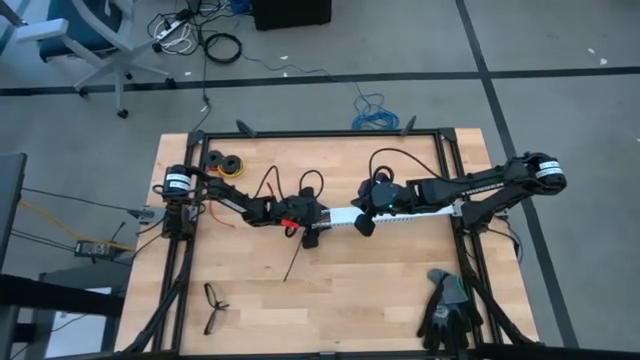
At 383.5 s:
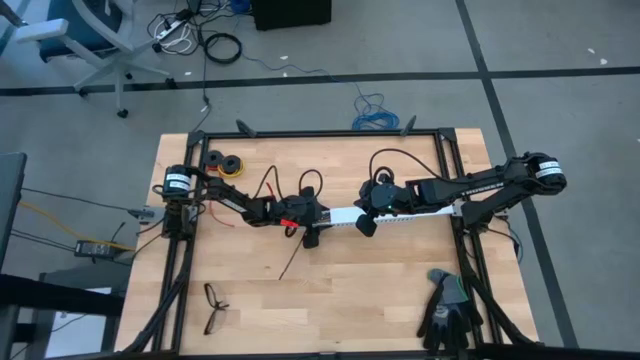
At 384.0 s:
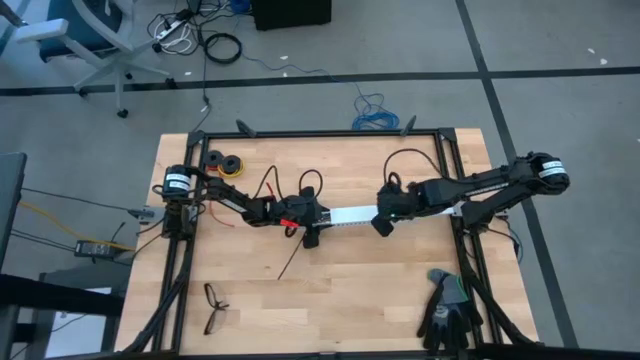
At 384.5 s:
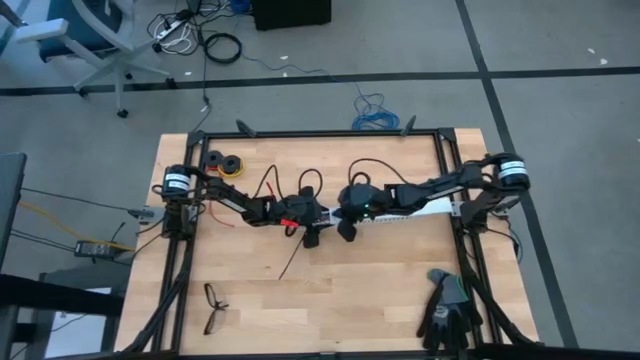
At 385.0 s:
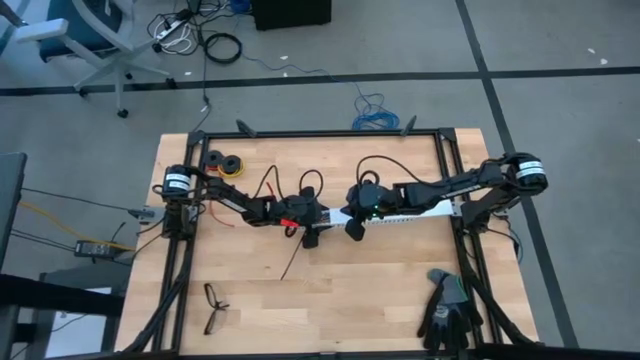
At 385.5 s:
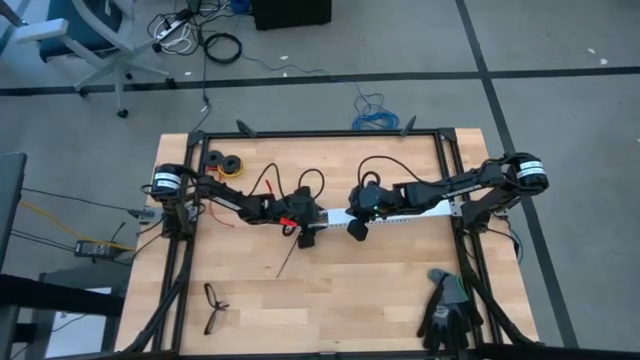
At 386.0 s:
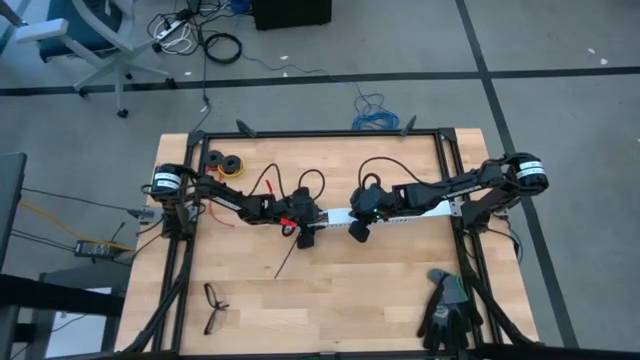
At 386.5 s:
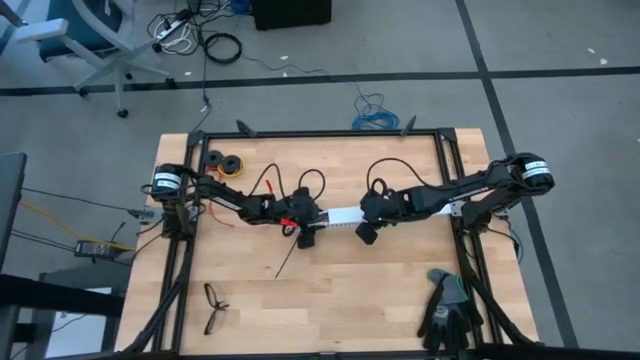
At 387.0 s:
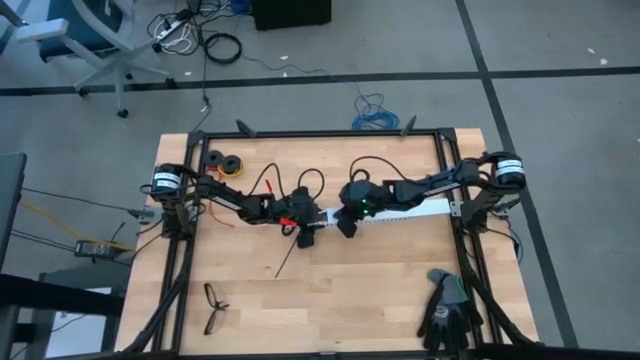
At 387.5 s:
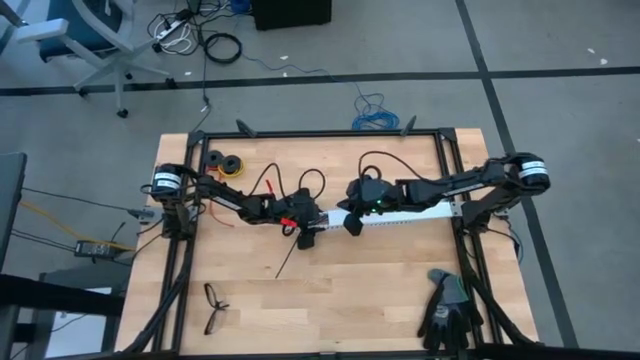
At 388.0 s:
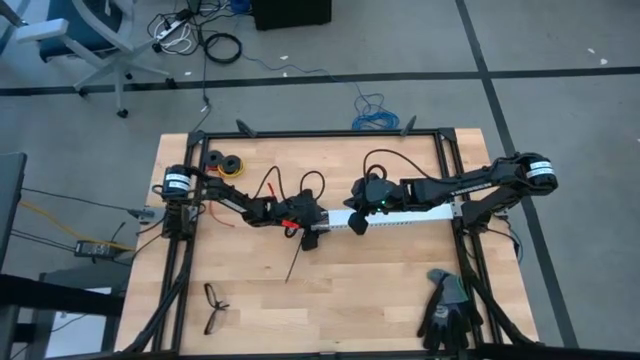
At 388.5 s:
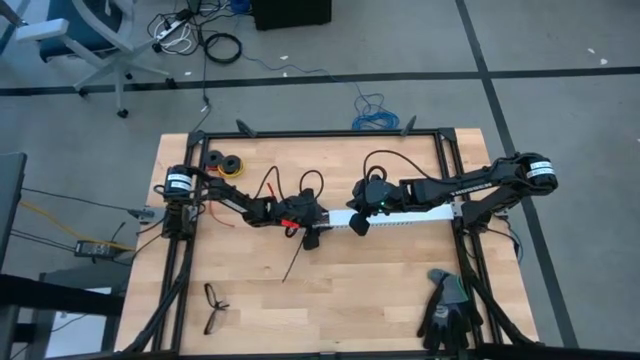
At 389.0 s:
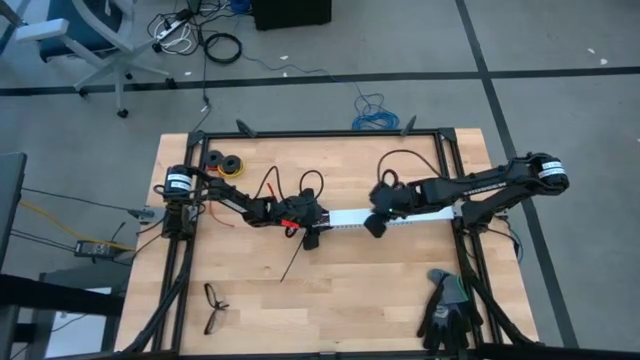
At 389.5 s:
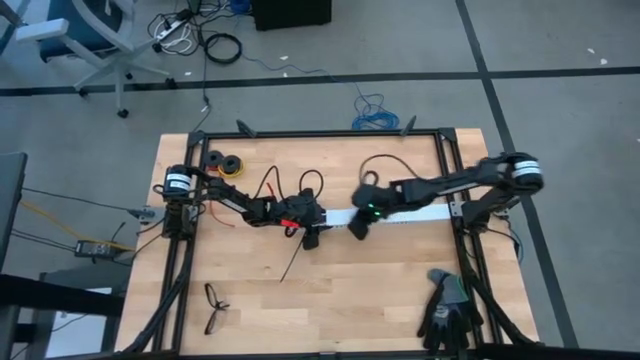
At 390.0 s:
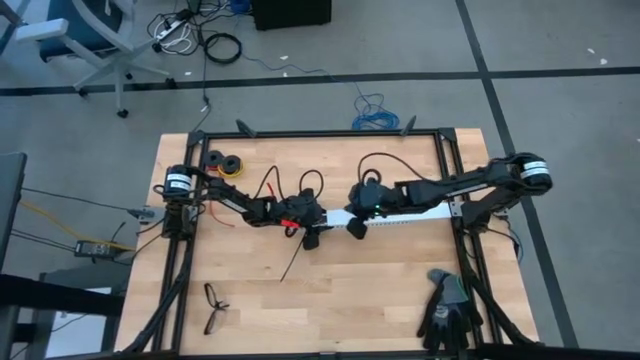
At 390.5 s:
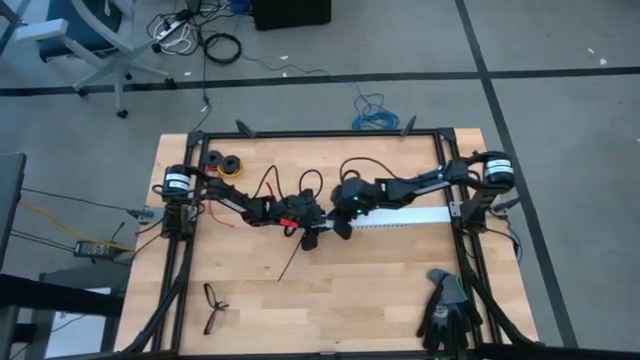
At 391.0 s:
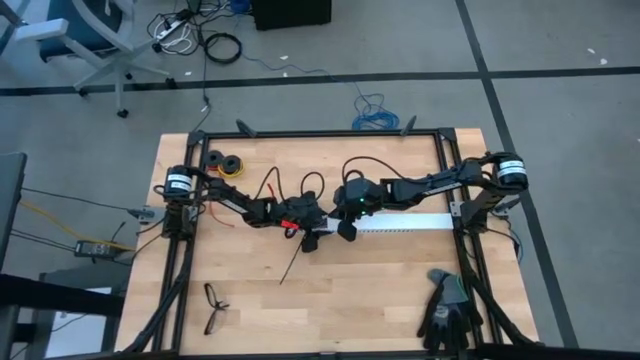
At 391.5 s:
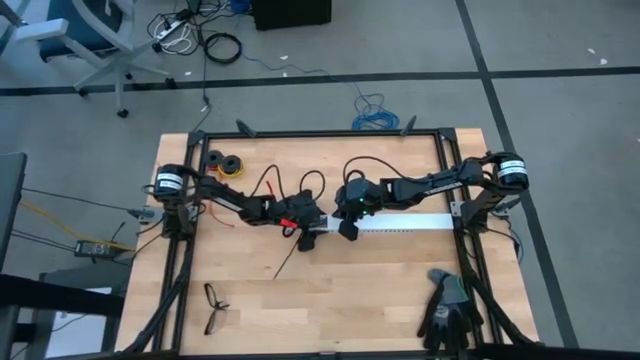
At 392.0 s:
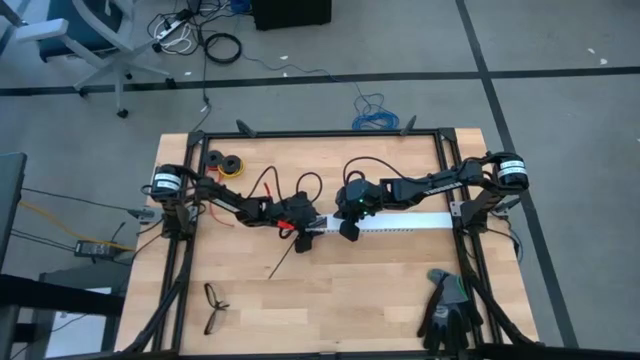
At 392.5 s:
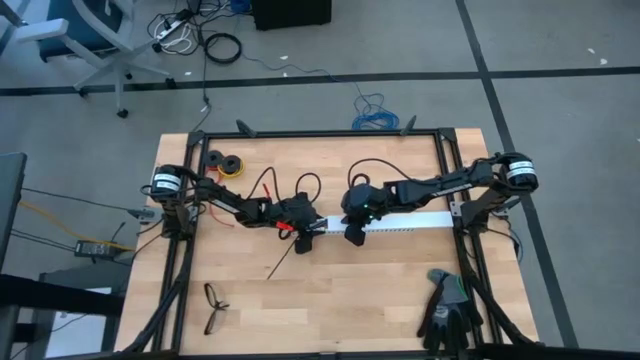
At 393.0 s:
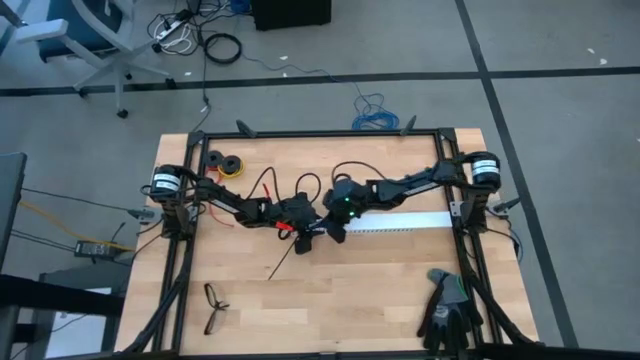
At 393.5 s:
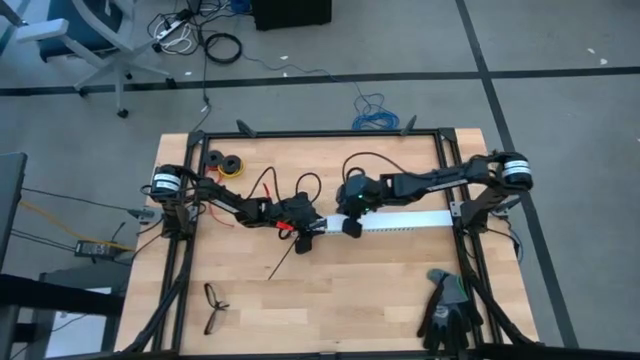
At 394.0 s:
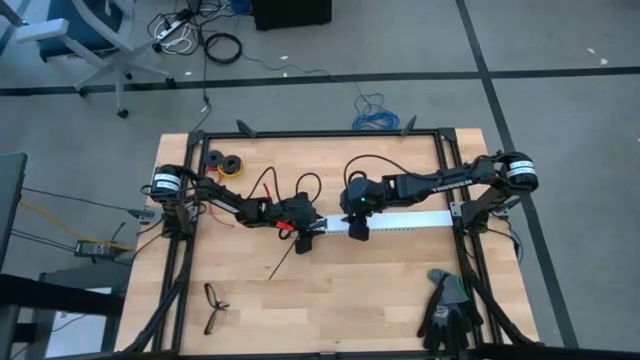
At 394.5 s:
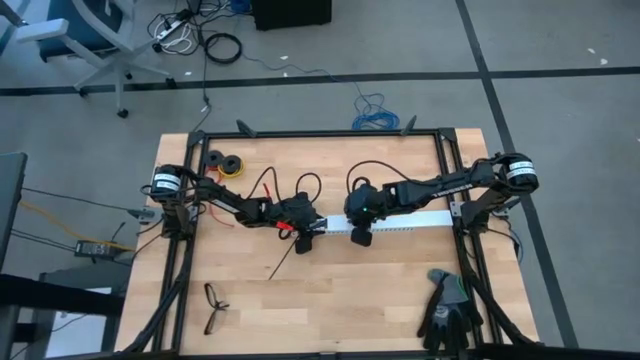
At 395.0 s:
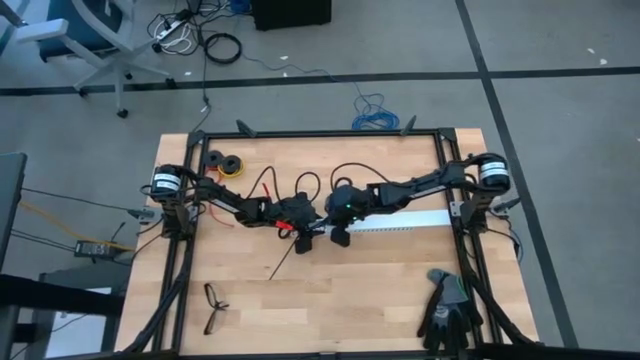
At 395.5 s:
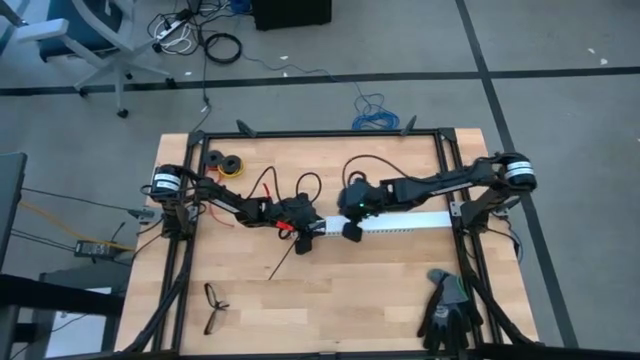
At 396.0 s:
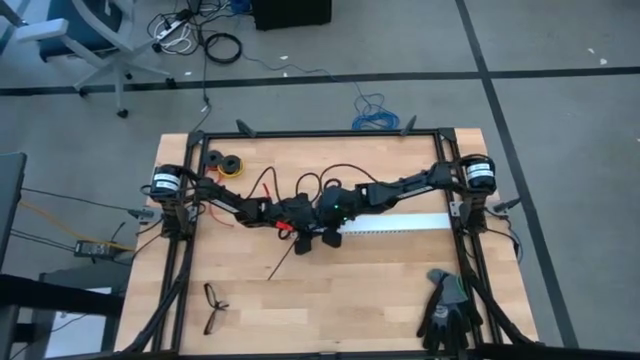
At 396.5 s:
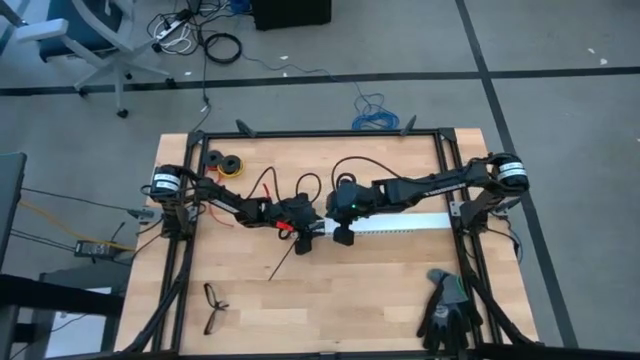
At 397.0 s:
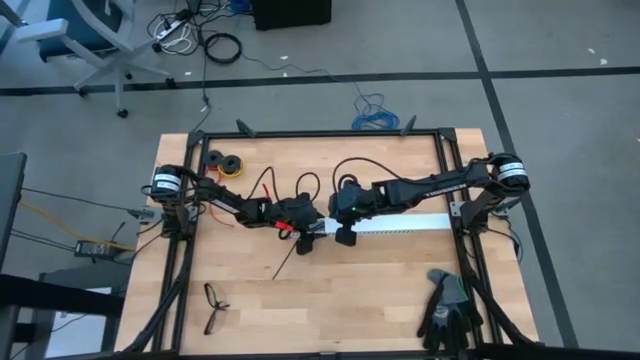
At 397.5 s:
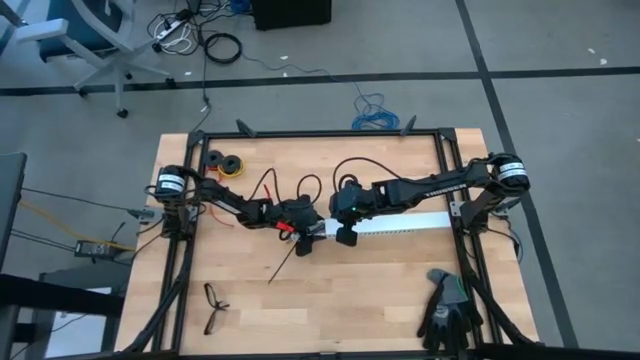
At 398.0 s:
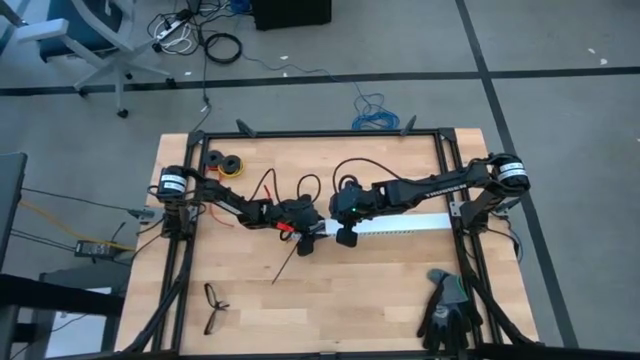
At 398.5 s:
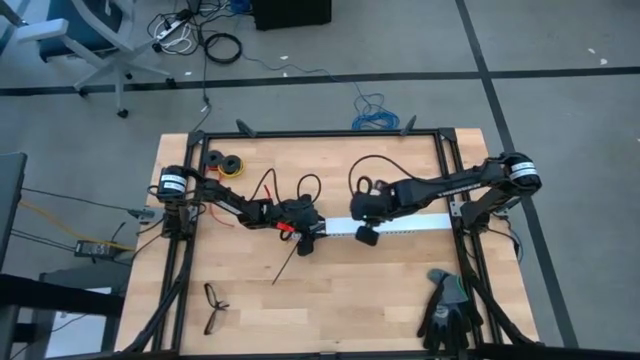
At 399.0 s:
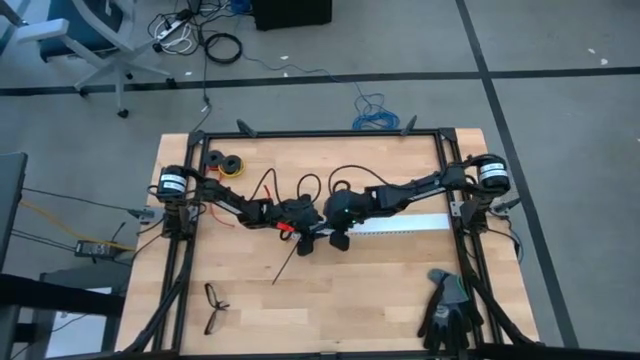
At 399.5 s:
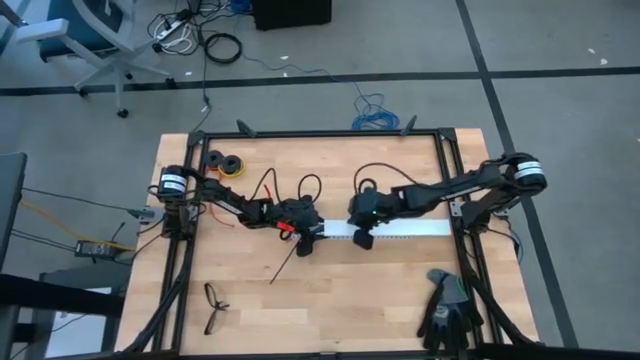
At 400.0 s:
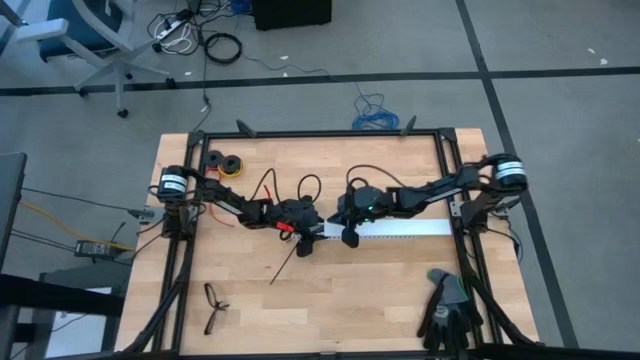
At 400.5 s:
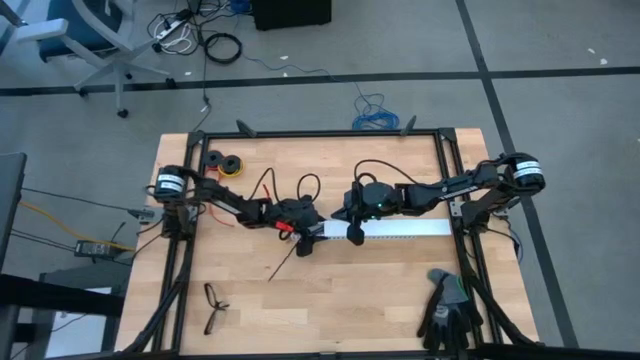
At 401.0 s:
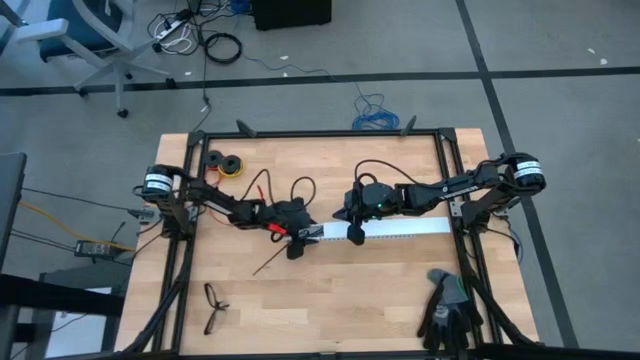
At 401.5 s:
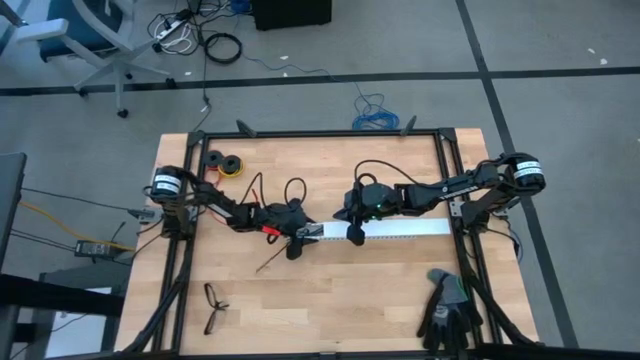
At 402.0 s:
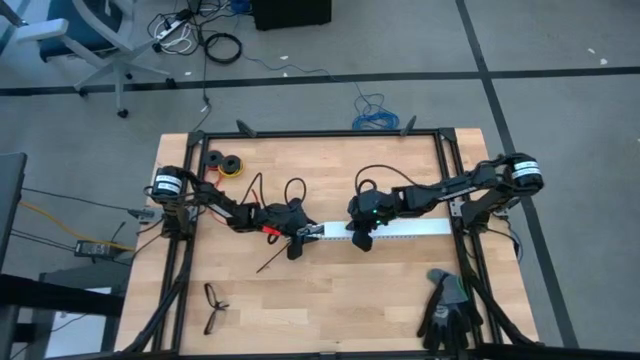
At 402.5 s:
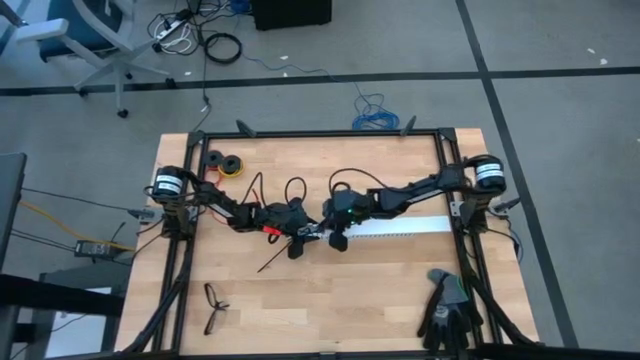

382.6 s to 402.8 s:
Task: Ziptie cables
Close the white cable duct
